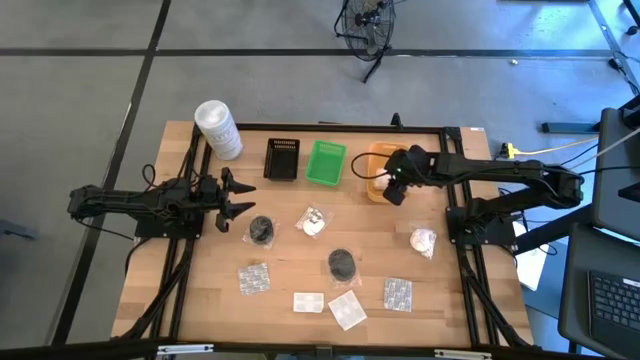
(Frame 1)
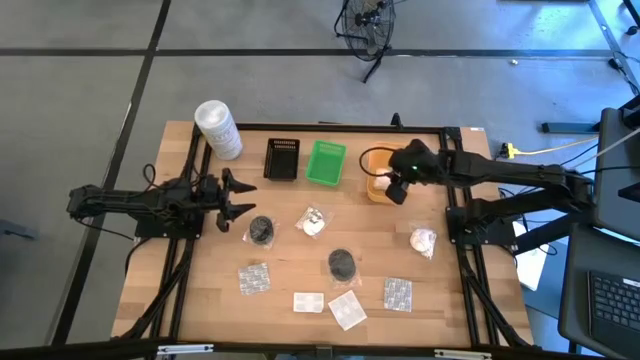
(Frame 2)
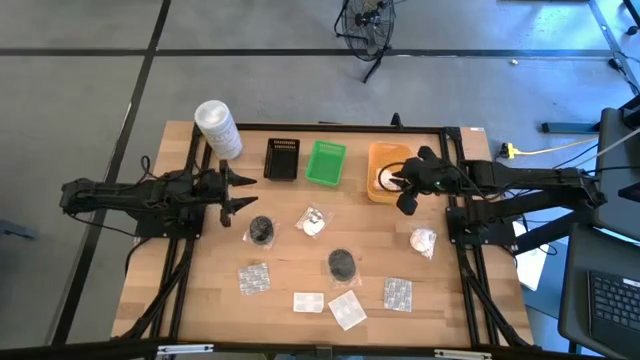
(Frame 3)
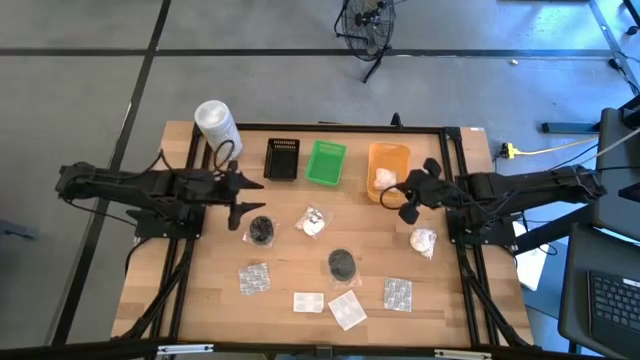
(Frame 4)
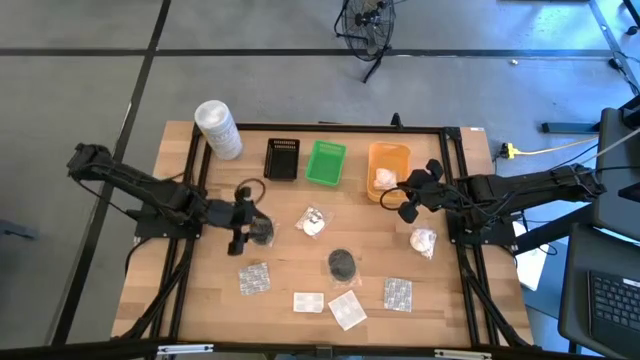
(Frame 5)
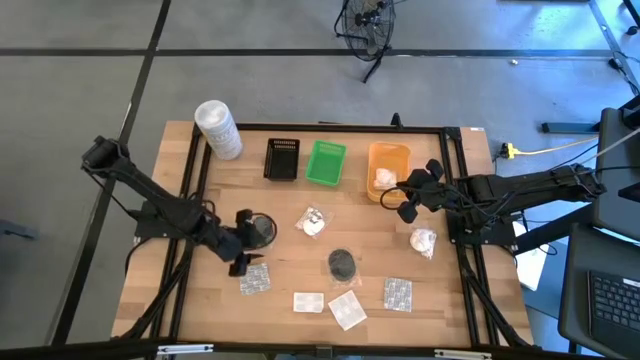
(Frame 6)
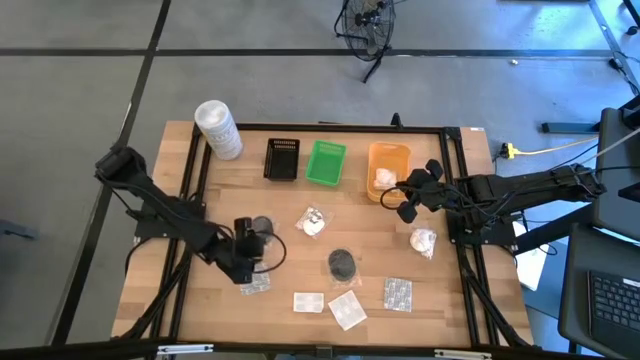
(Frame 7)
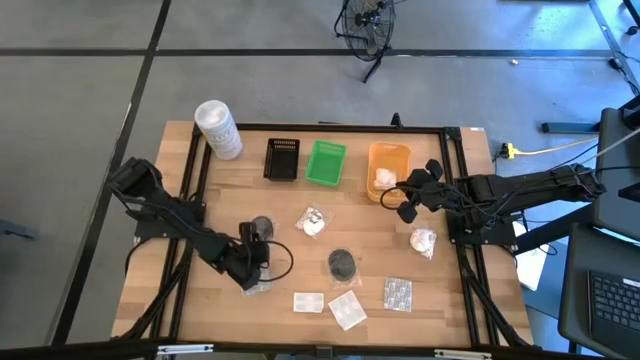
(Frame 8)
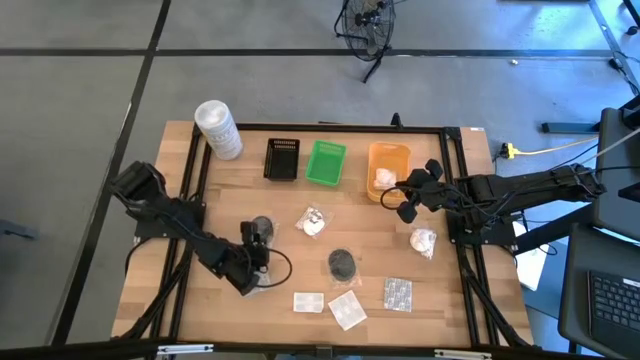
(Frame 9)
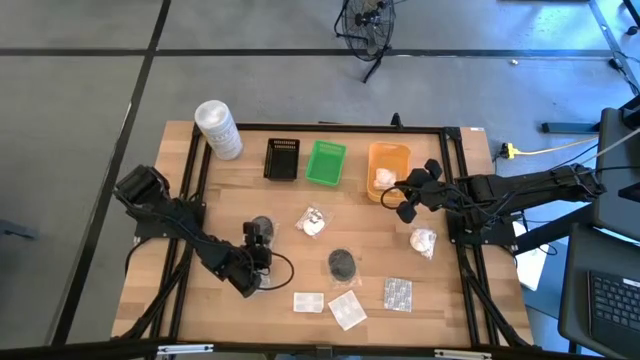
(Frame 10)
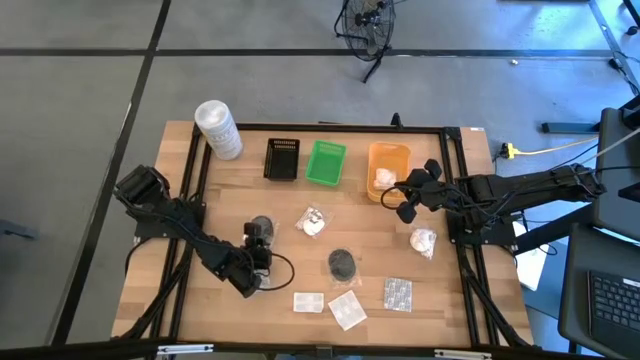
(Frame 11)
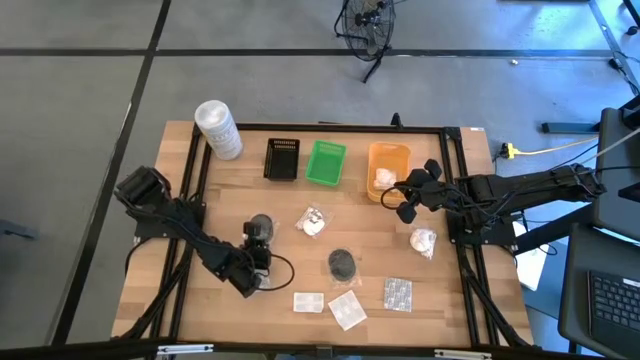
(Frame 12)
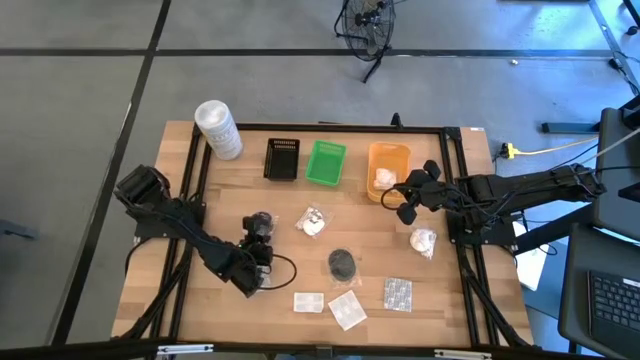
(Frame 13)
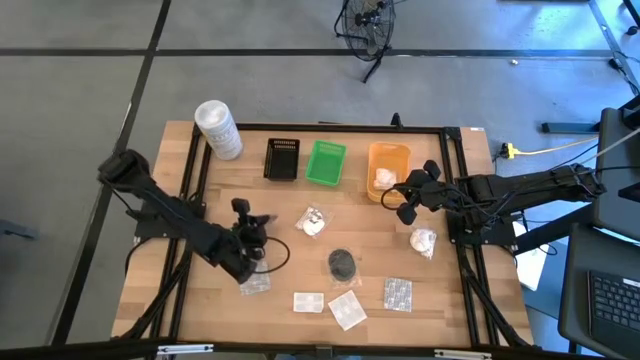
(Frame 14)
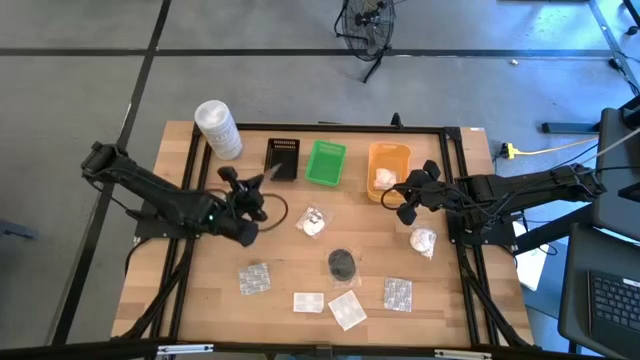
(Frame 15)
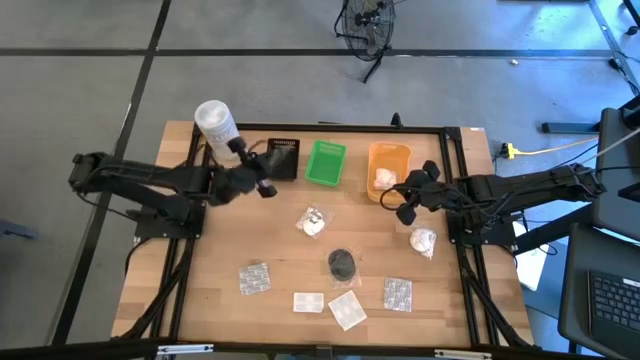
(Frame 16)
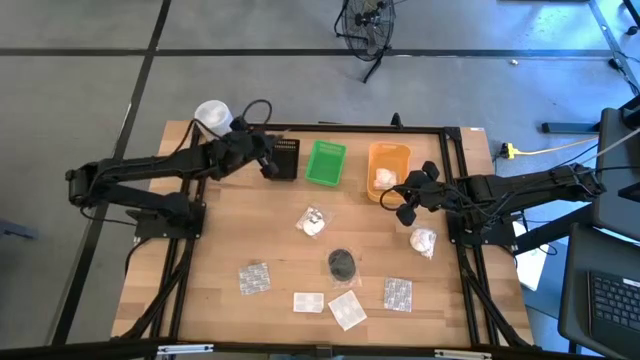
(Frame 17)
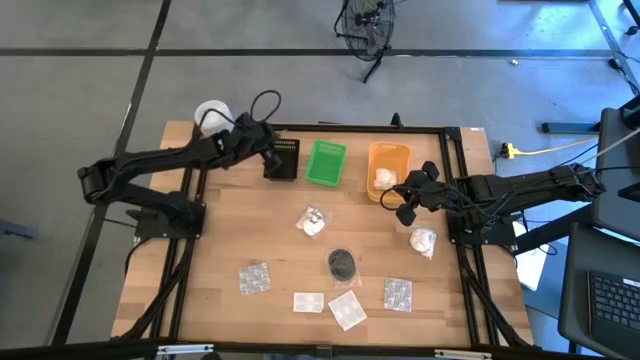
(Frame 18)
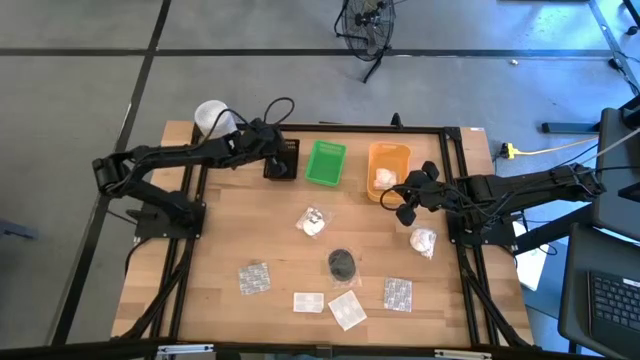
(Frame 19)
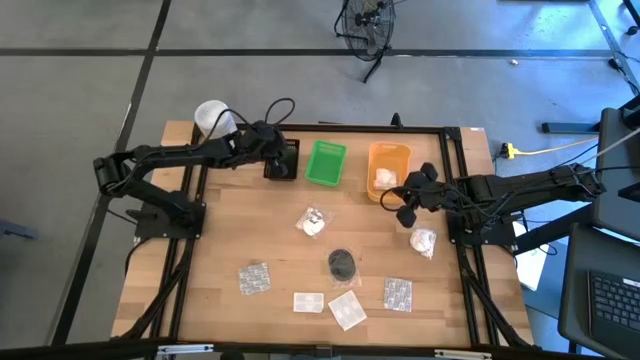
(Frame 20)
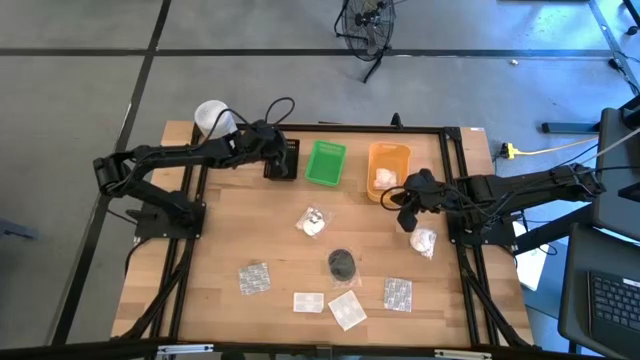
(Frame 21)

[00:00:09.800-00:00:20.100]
Task: Pick & Place Travel size toiletries
Put the black hairbrush into the black bin

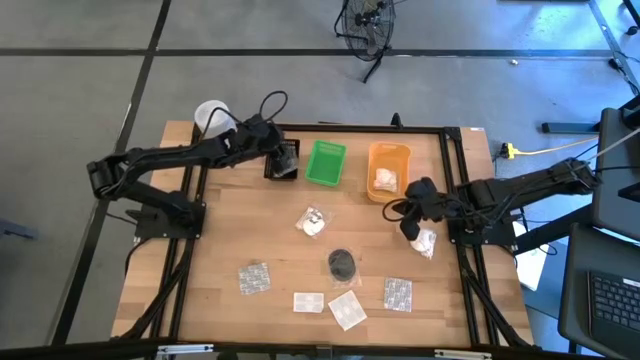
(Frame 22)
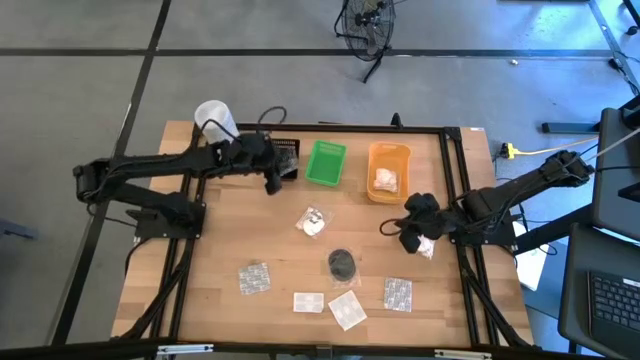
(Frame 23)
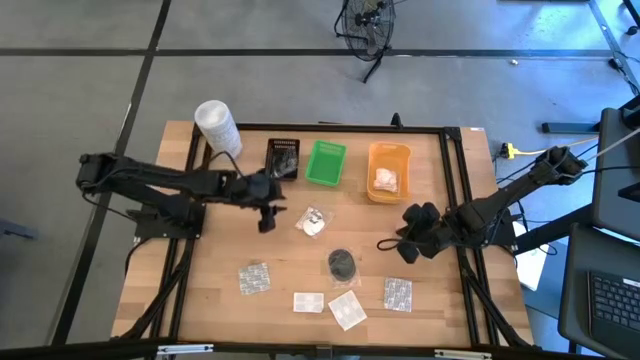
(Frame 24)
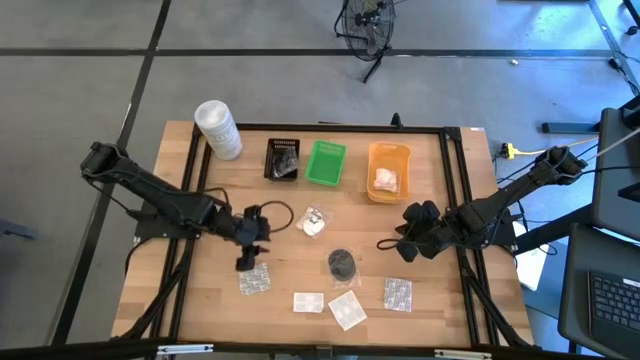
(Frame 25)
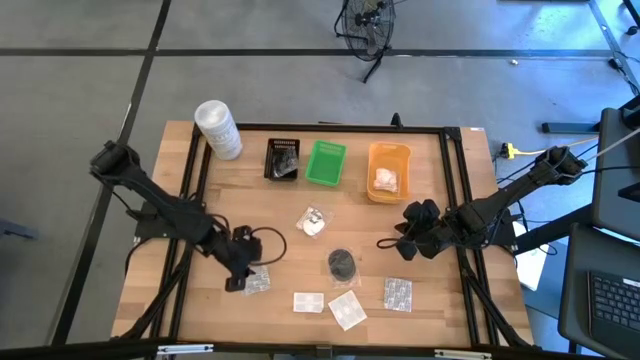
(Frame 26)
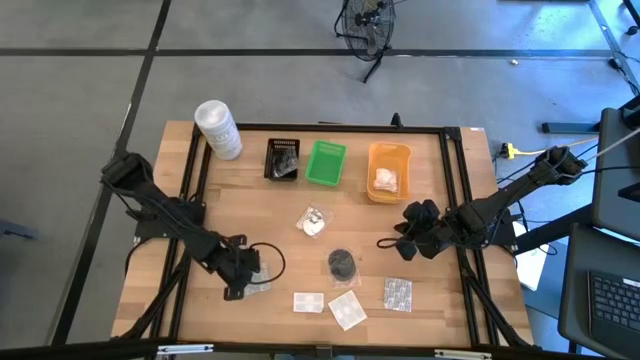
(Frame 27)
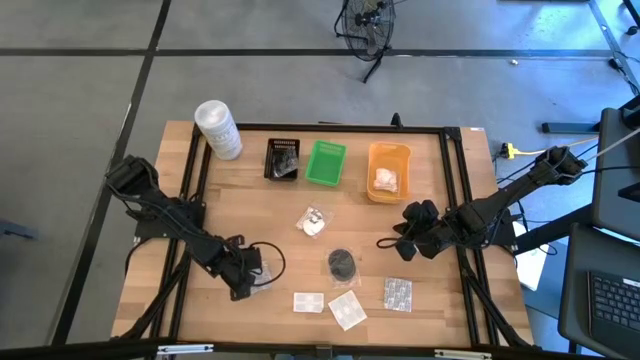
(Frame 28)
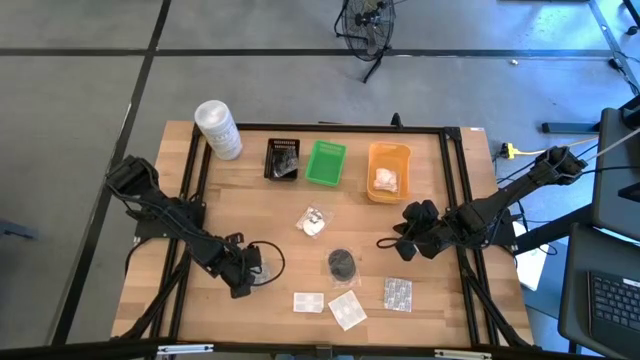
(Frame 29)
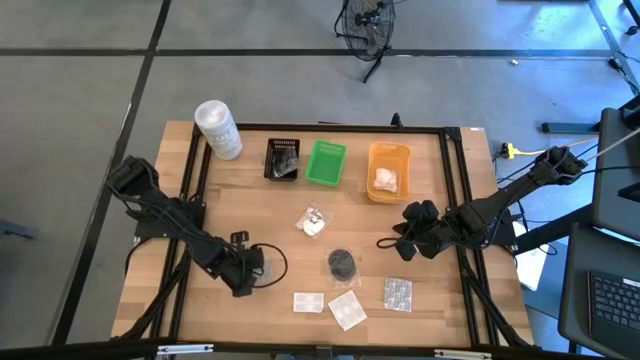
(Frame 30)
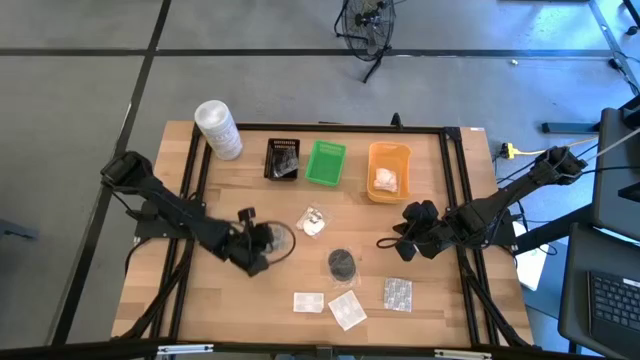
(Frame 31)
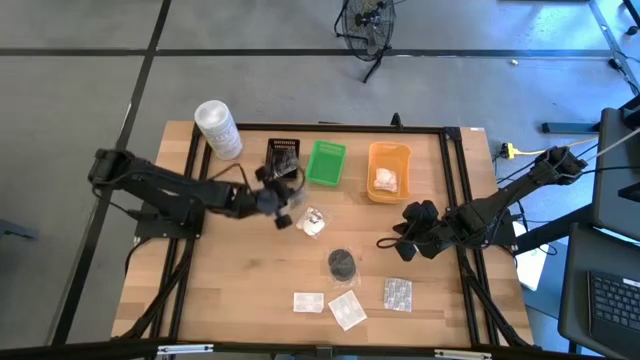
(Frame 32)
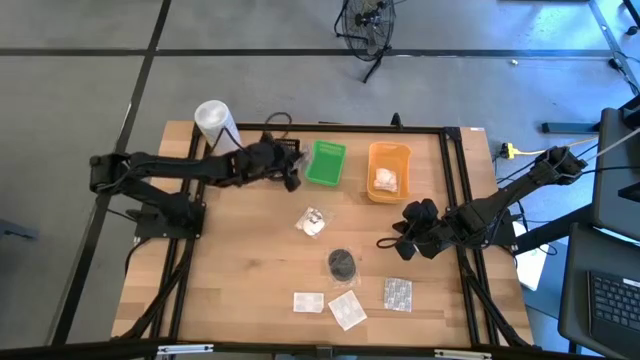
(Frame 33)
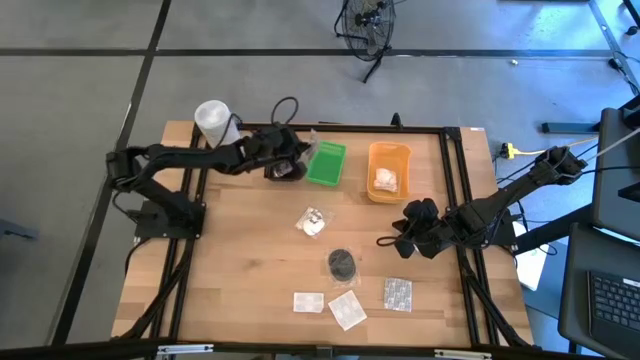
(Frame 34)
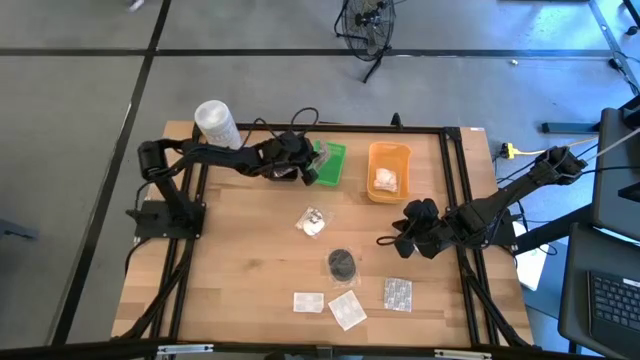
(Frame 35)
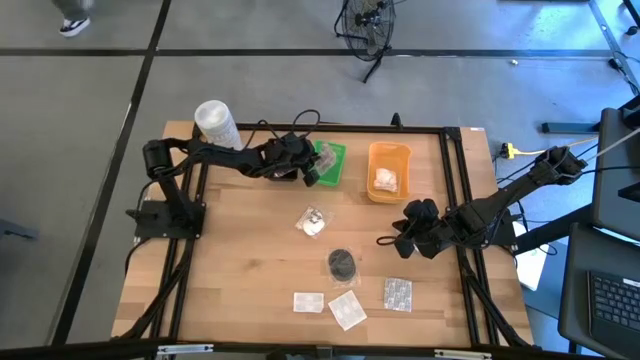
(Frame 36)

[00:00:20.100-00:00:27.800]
Put the white bandage pack into the green bin

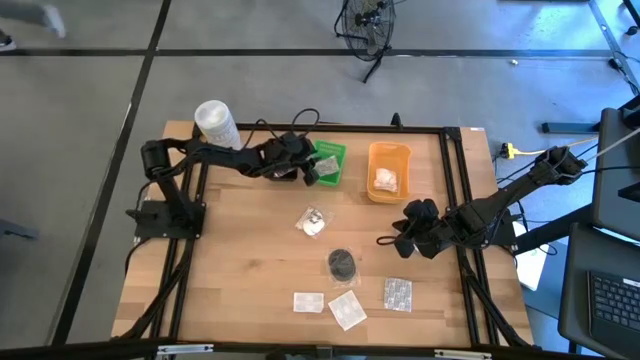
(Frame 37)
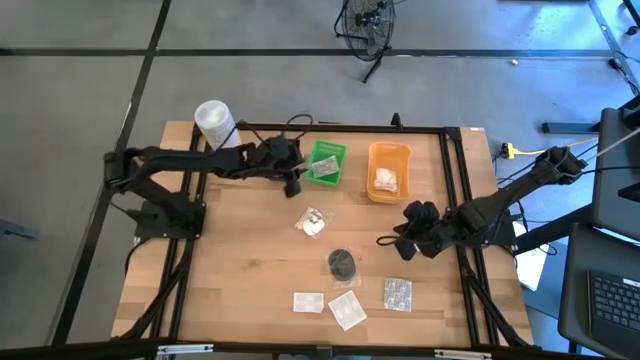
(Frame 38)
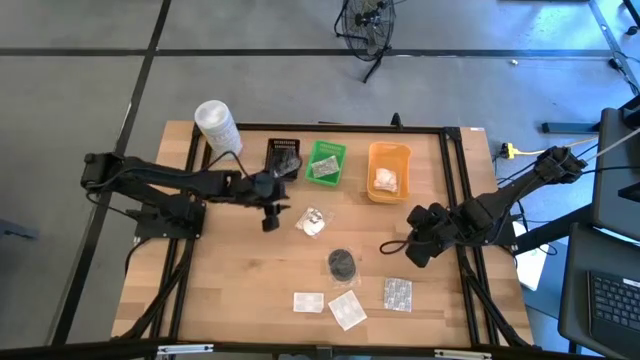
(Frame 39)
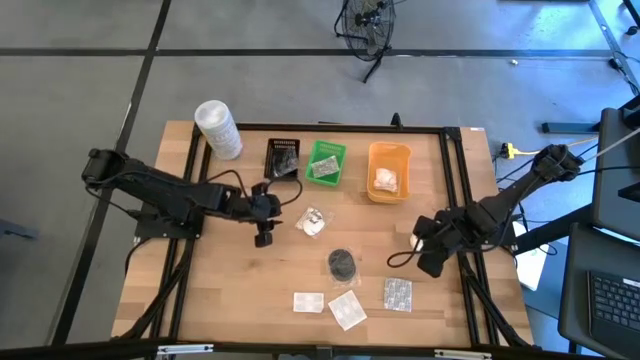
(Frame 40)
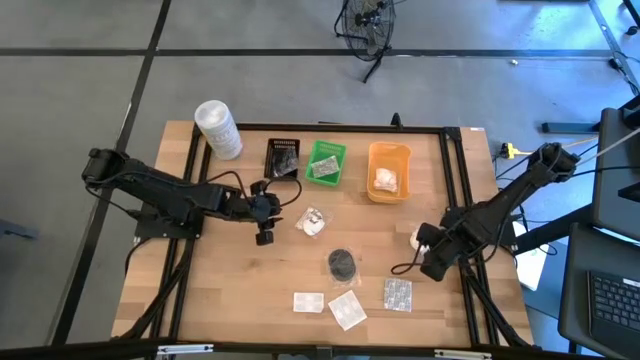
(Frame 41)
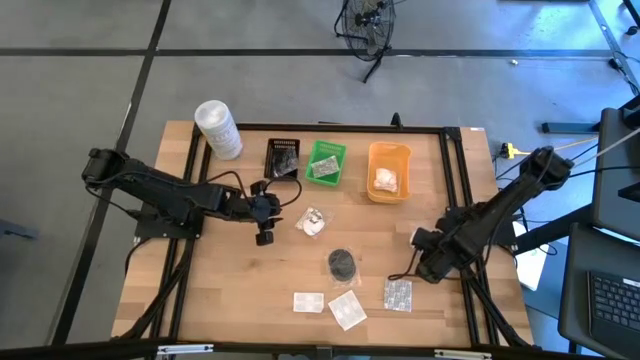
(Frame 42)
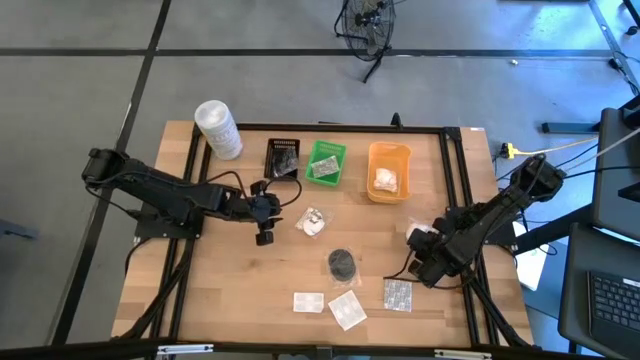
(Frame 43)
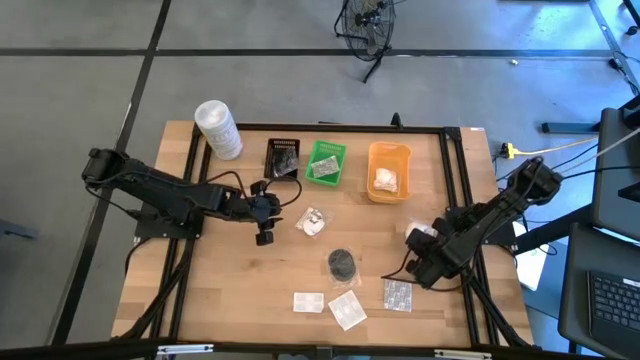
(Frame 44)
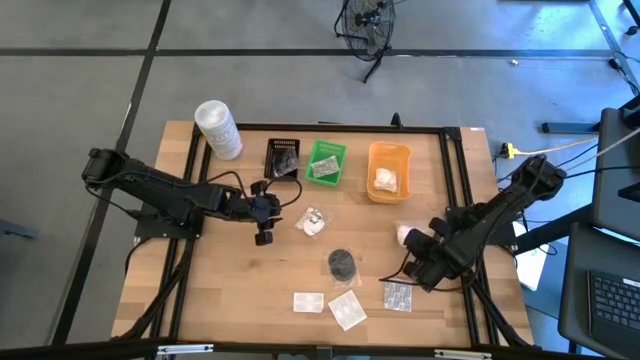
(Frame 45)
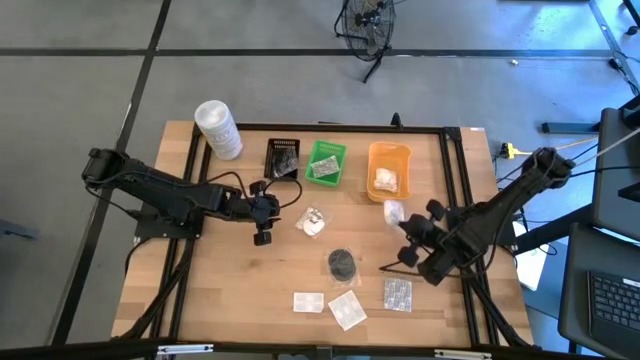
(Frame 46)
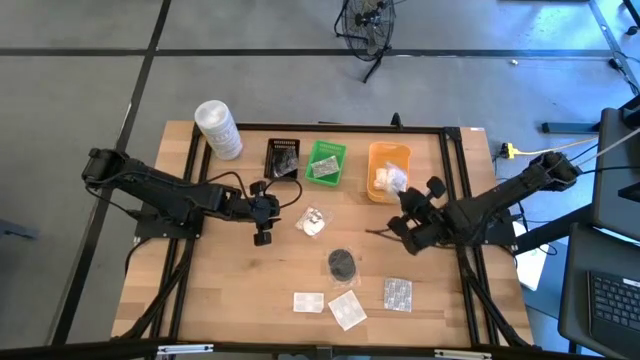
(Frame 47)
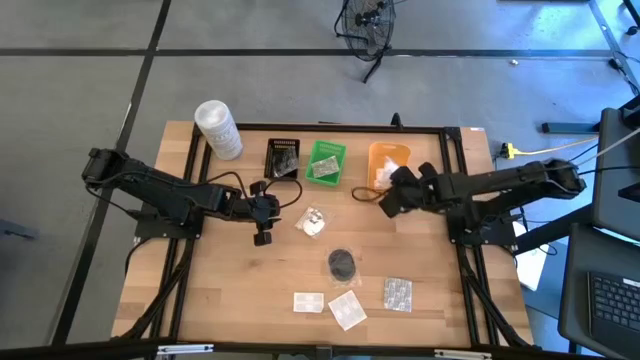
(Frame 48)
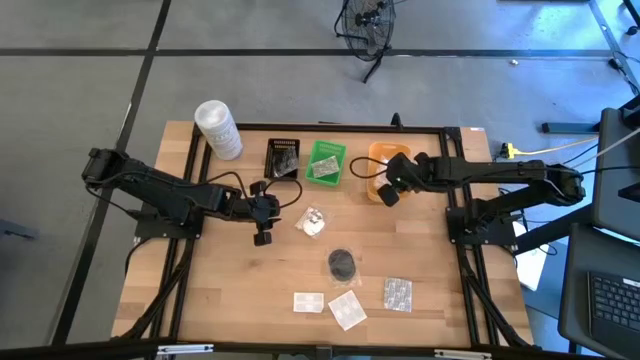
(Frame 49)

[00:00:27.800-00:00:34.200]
Put the white cotton pack into the yellow bin
